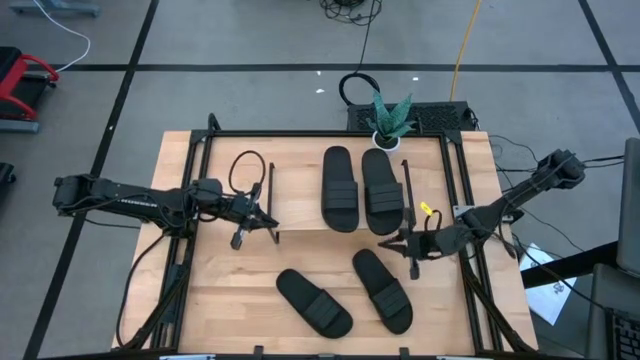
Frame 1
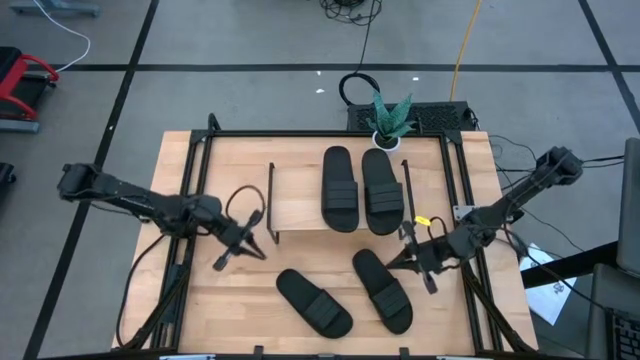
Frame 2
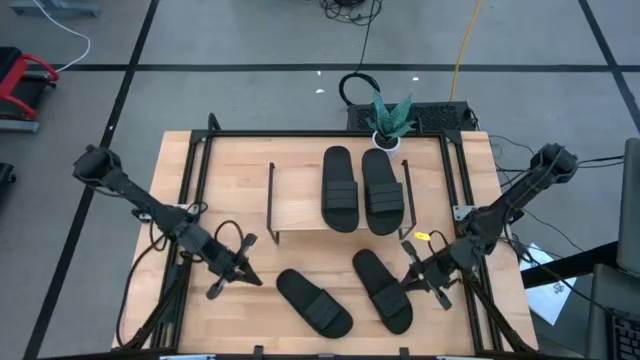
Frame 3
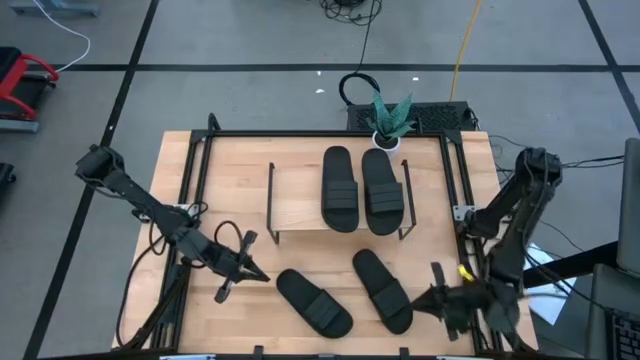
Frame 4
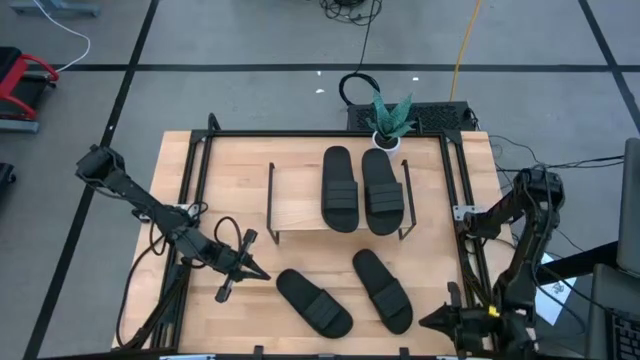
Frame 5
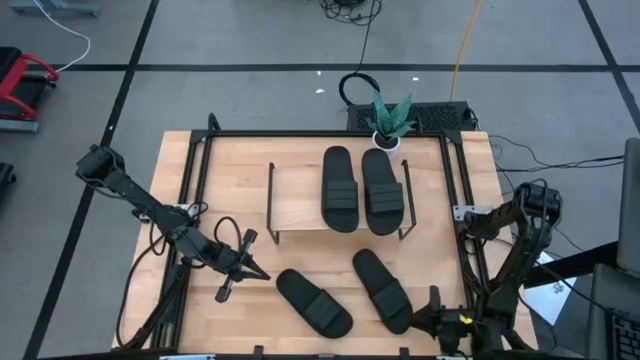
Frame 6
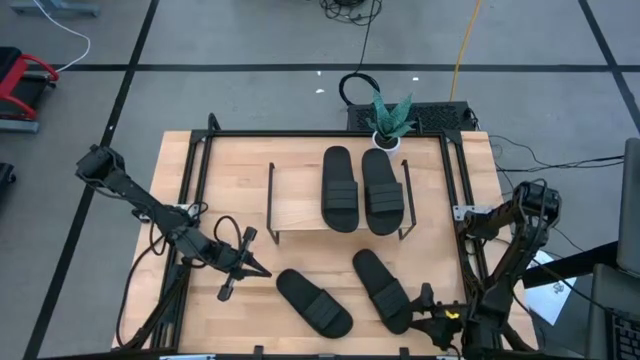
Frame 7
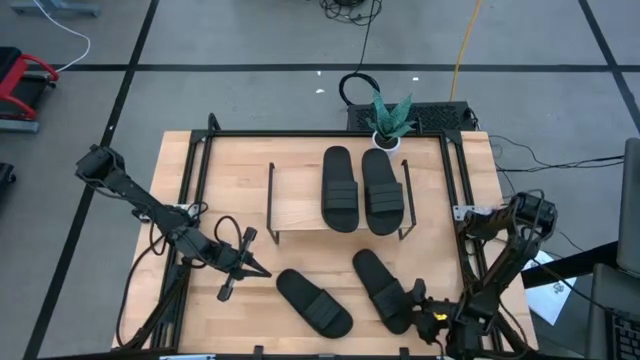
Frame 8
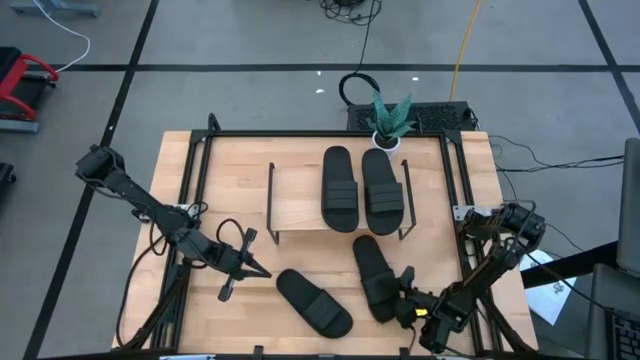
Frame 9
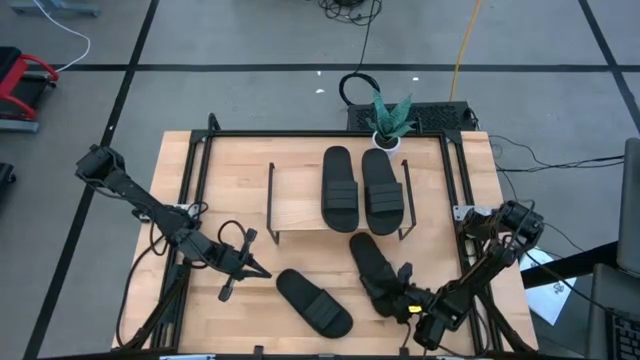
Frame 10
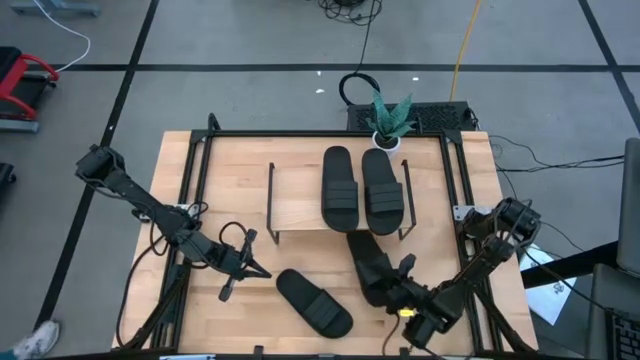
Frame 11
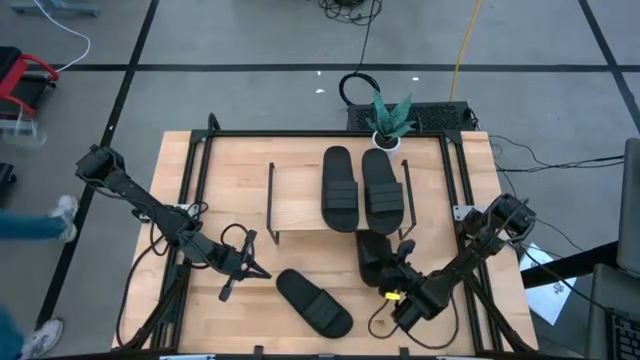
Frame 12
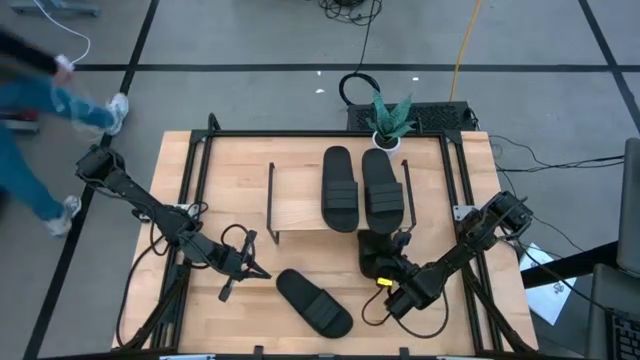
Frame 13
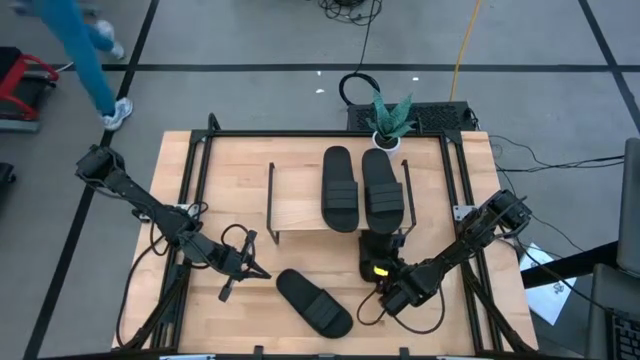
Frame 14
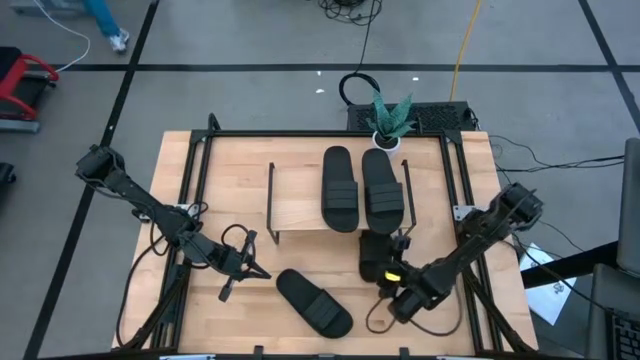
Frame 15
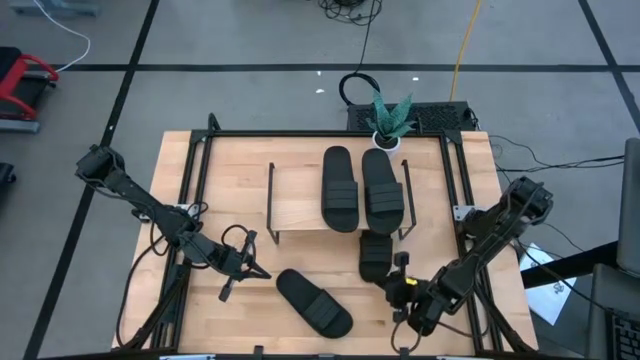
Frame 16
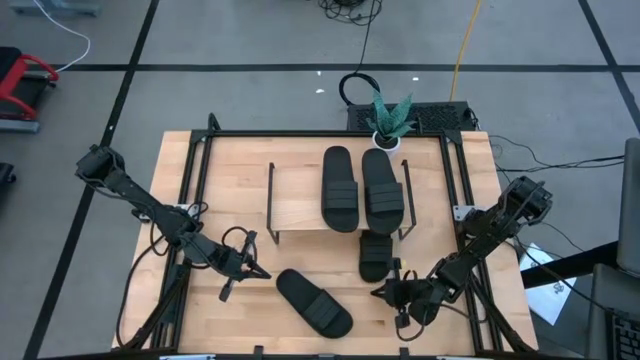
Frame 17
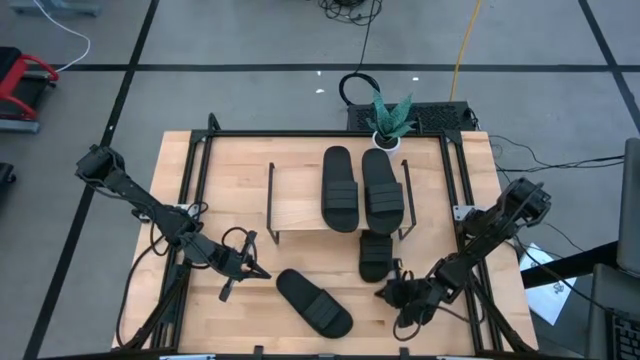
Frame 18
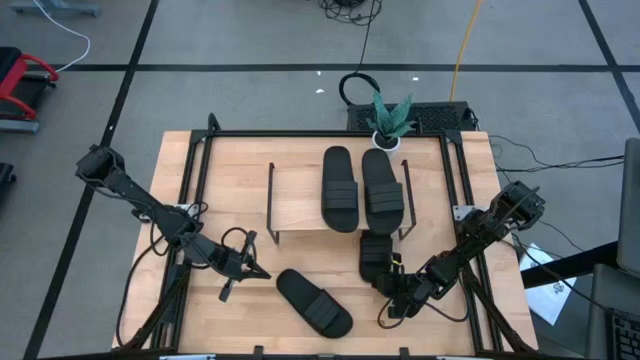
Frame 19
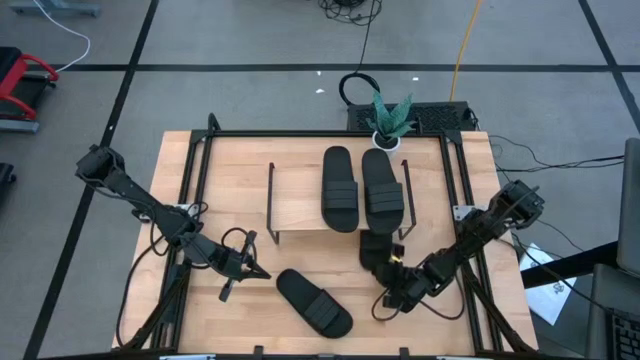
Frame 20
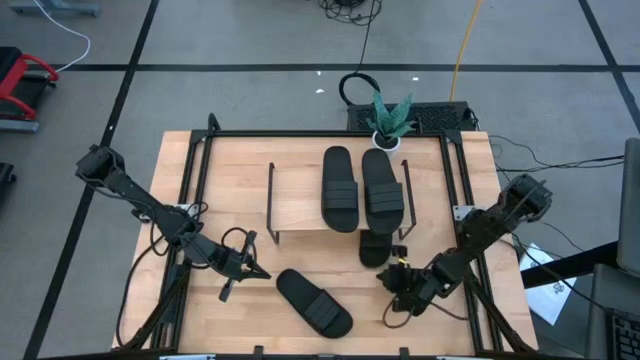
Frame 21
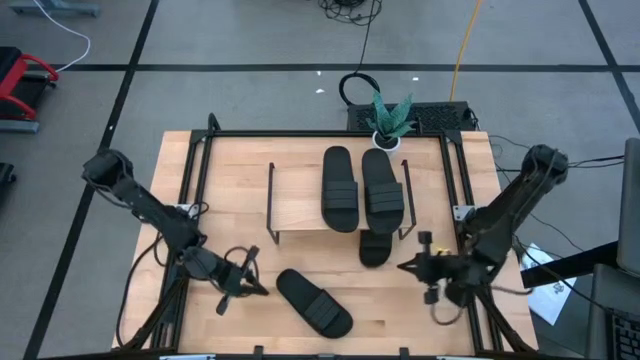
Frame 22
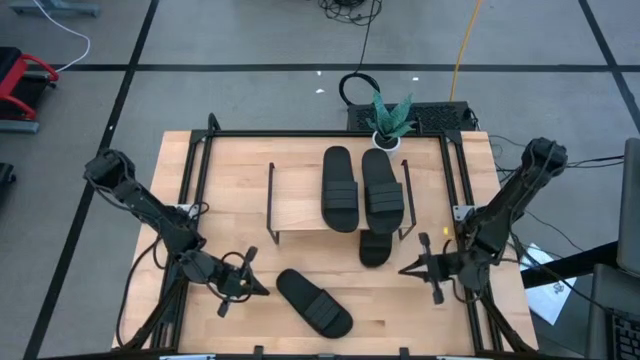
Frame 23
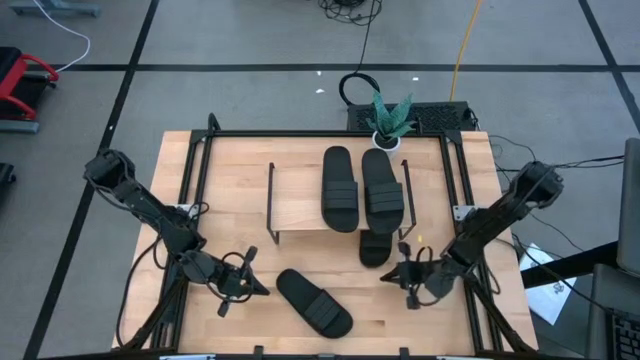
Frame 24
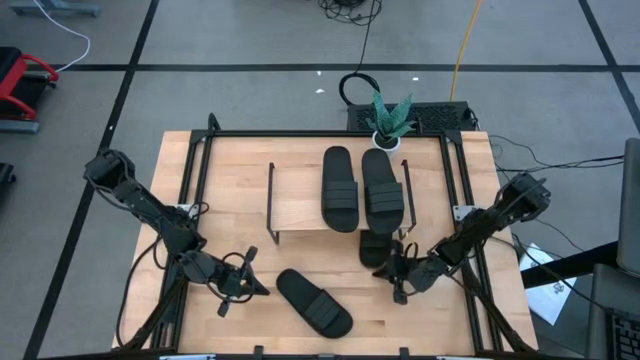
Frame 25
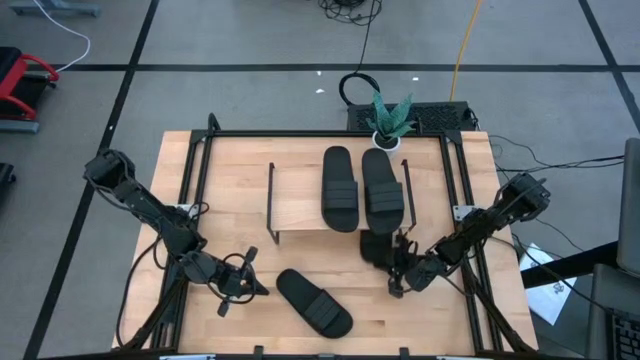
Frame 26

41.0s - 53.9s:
Task: Pick and place slides into the shelf
Put the black slipper under the shelf

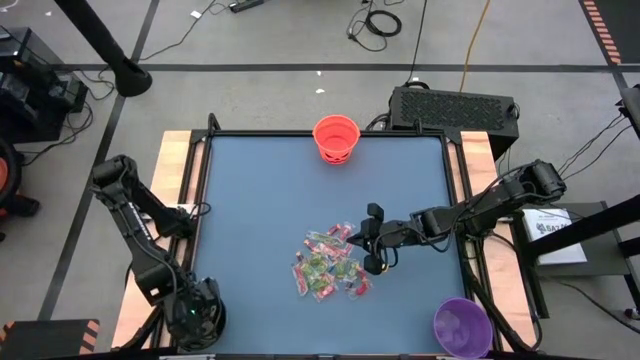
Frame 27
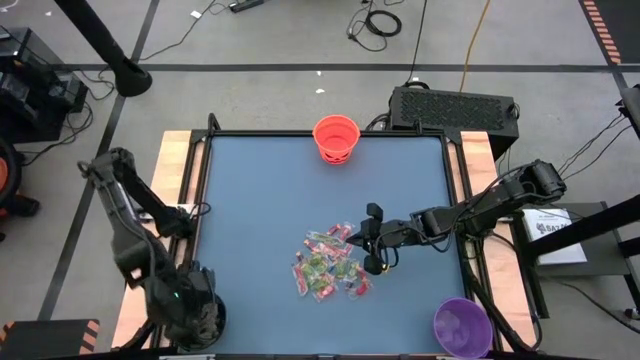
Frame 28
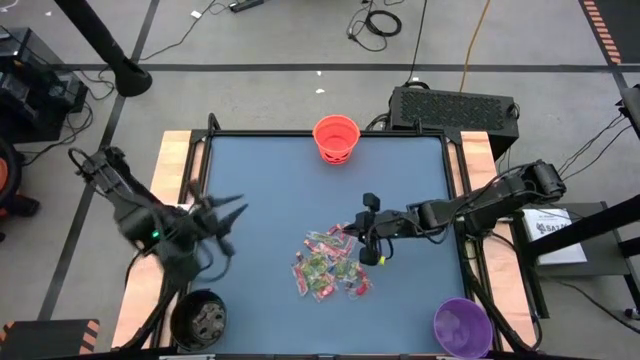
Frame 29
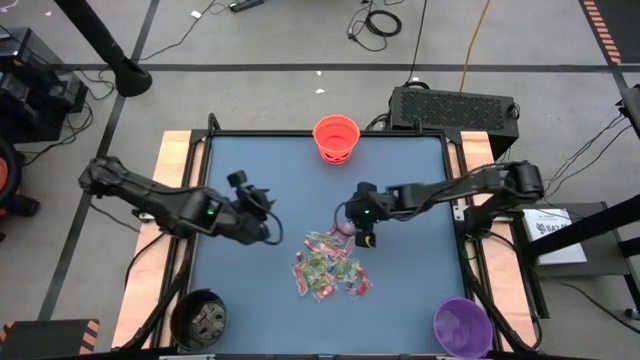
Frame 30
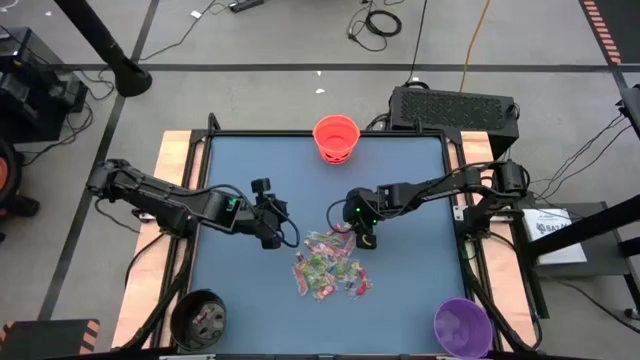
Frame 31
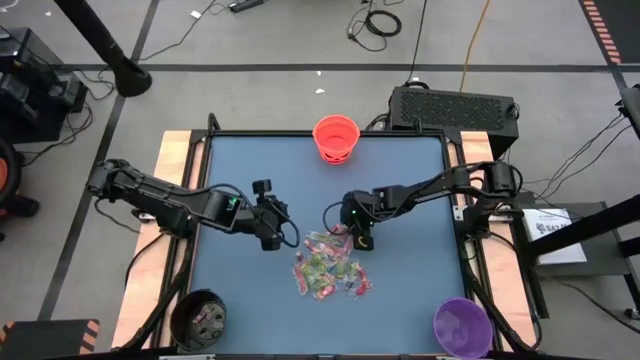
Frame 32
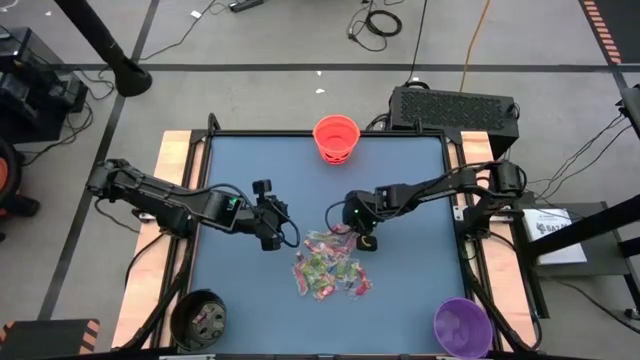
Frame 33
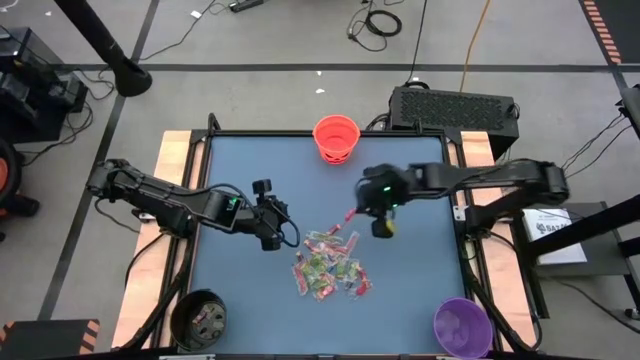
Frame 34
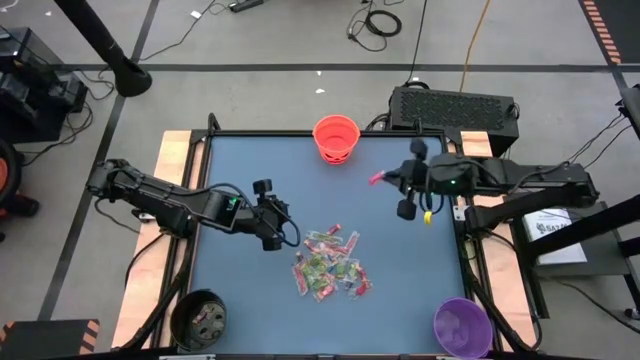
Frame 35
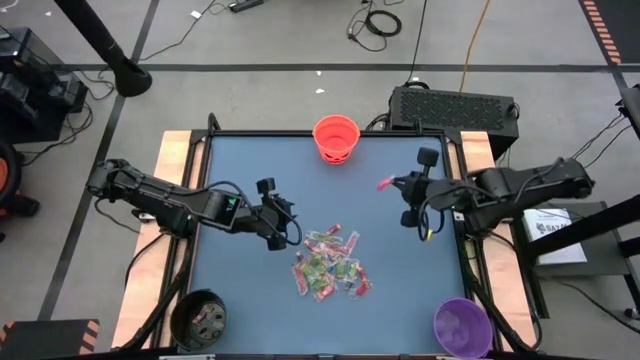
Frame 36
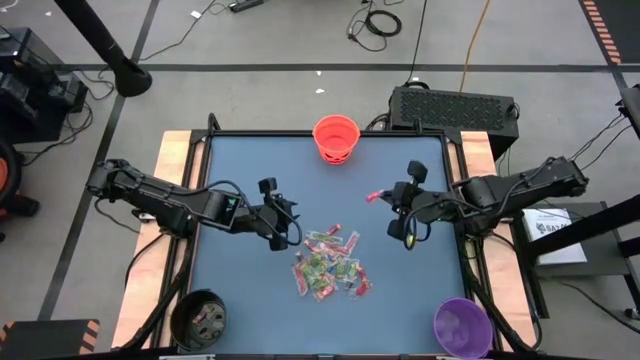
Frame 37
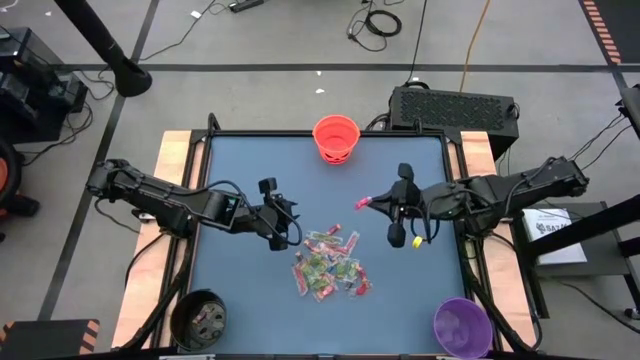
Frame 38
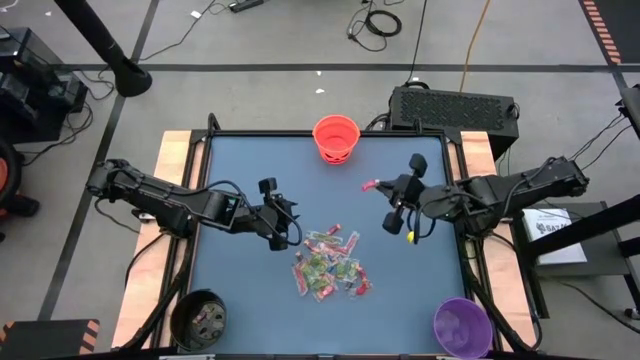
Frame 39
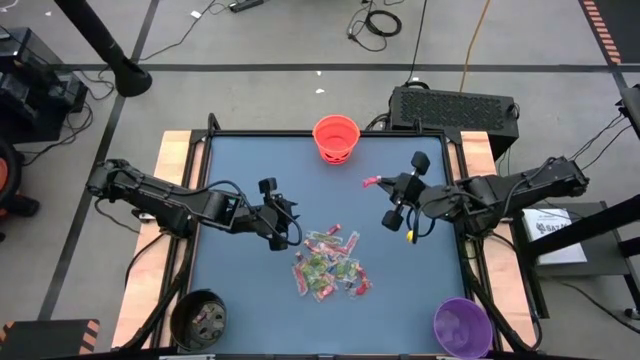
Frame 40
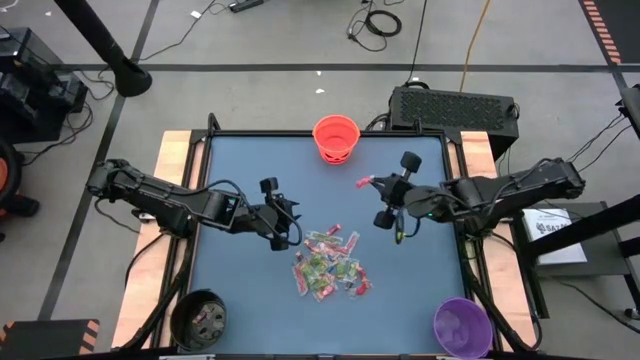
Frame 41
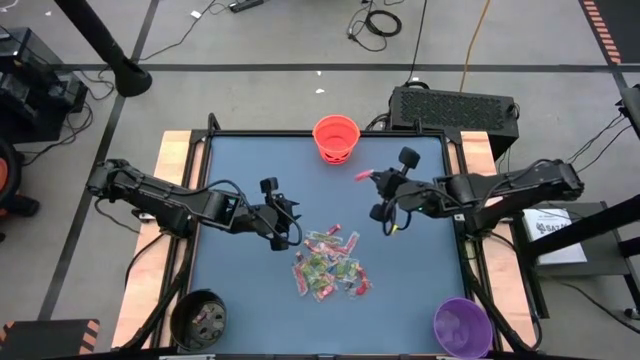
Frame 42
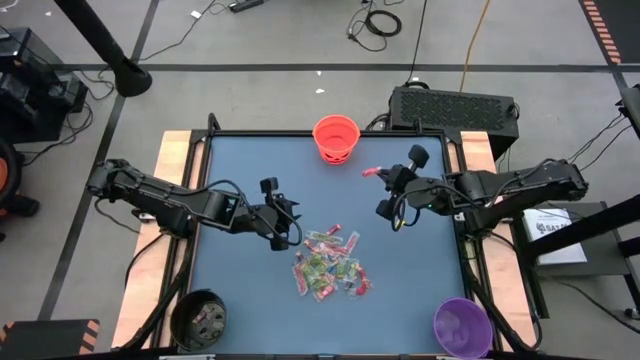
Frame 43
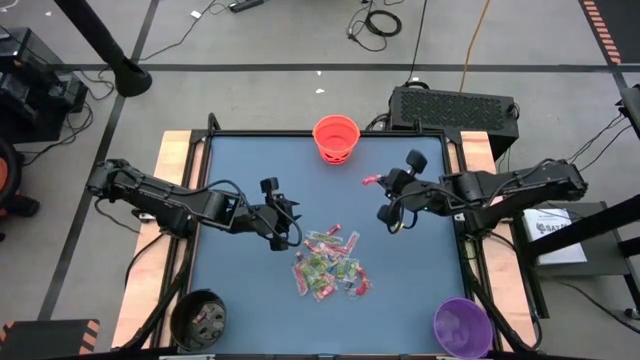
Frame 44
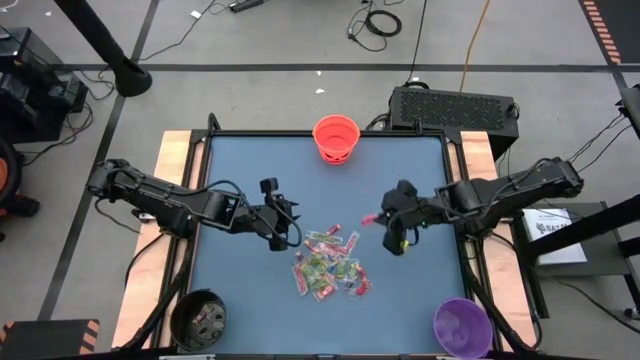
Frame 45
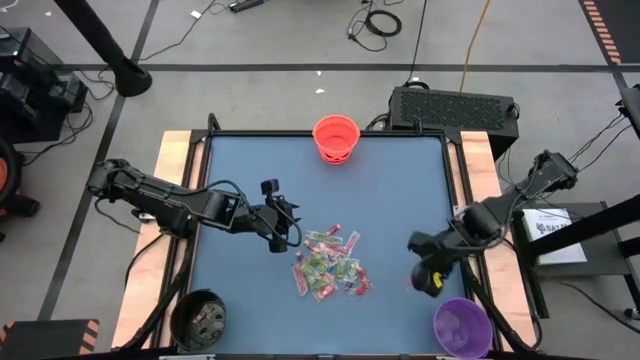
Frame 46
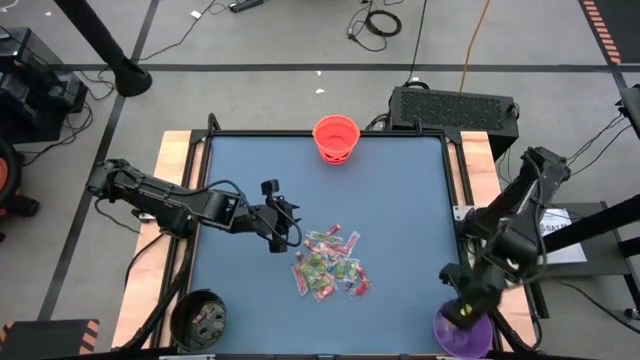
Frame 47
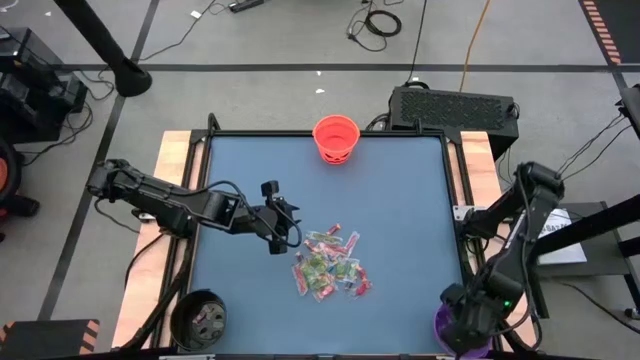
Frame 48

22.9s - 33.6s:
Task: Sort candy by brand, put in halloween buckets
Put the small orange gummy into the purple bucket
